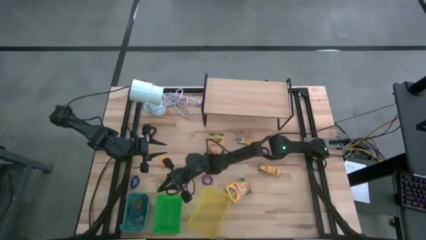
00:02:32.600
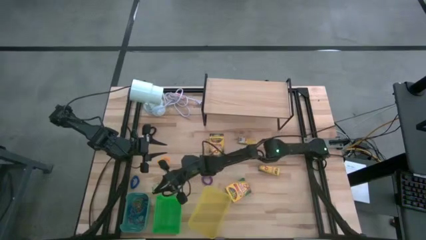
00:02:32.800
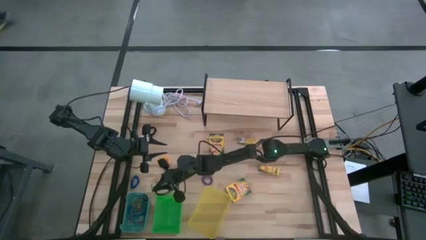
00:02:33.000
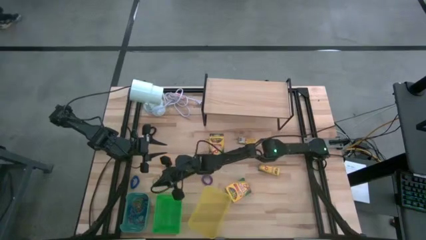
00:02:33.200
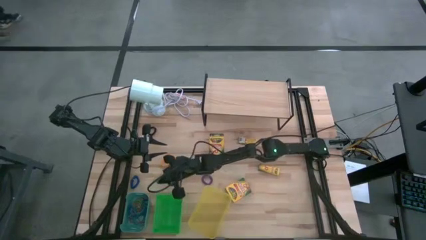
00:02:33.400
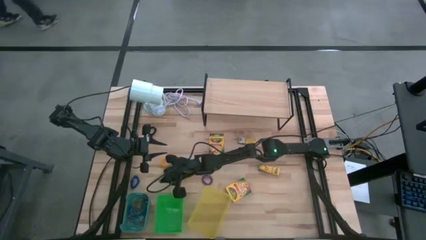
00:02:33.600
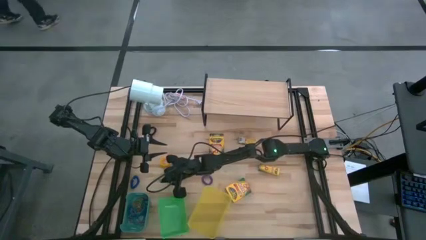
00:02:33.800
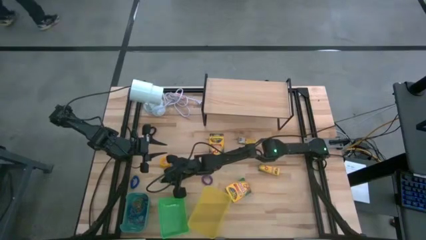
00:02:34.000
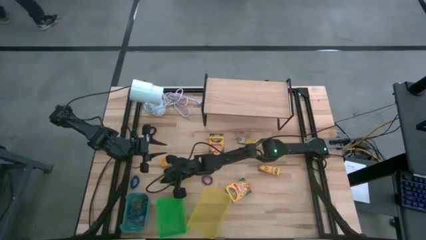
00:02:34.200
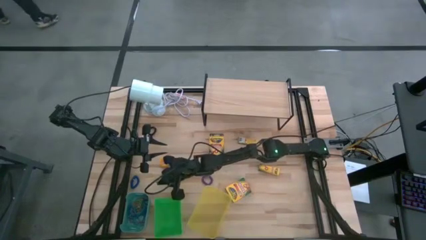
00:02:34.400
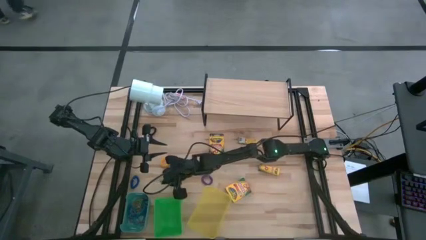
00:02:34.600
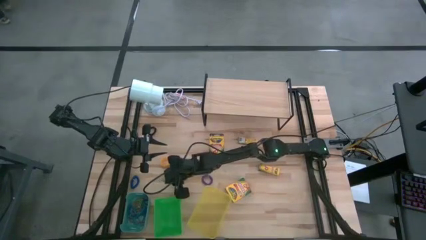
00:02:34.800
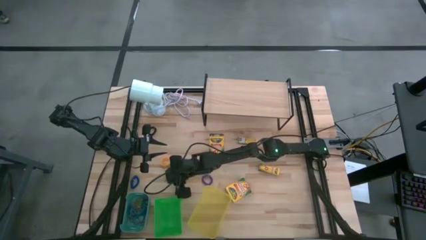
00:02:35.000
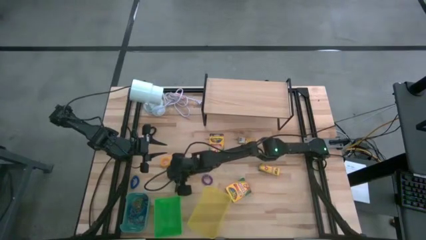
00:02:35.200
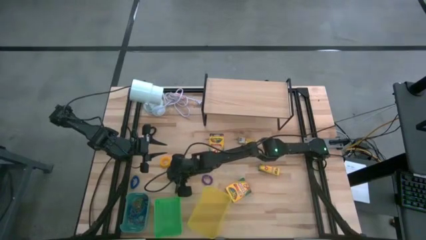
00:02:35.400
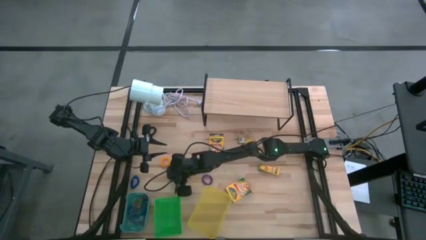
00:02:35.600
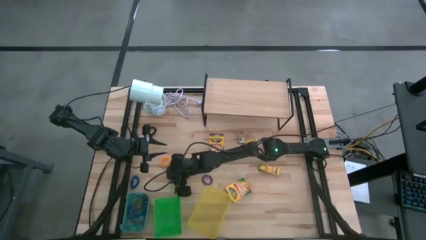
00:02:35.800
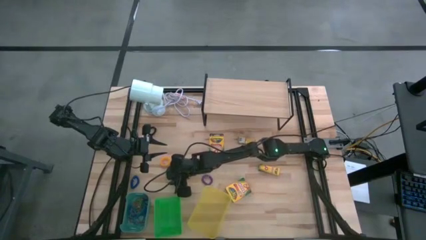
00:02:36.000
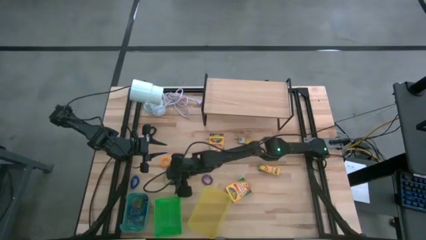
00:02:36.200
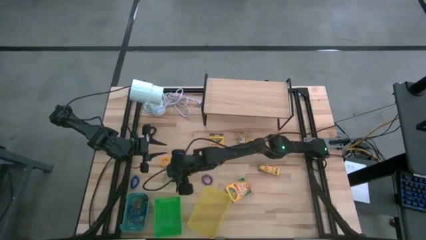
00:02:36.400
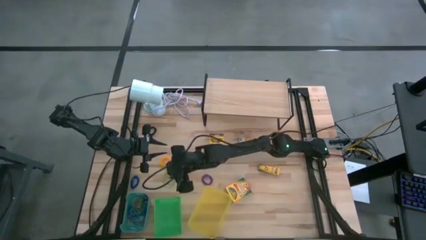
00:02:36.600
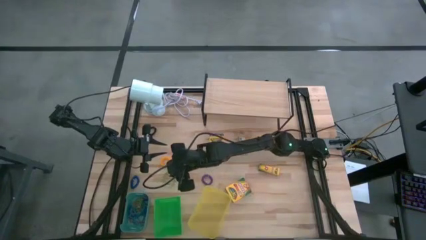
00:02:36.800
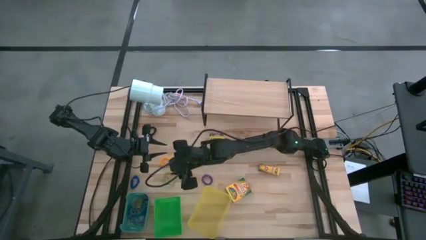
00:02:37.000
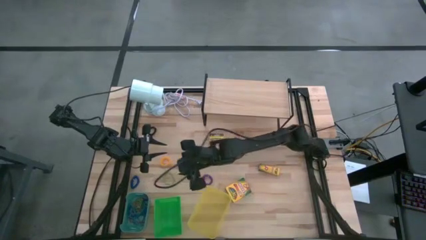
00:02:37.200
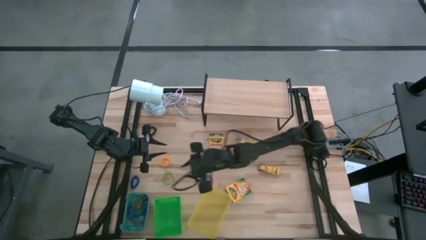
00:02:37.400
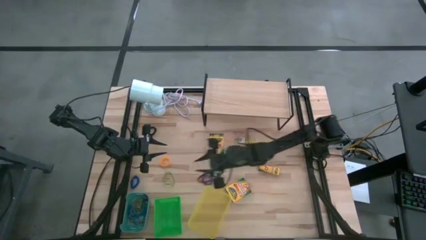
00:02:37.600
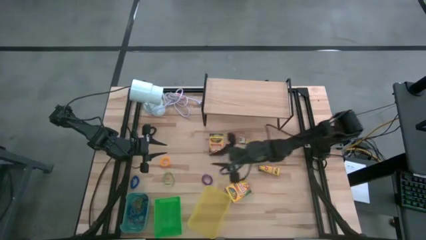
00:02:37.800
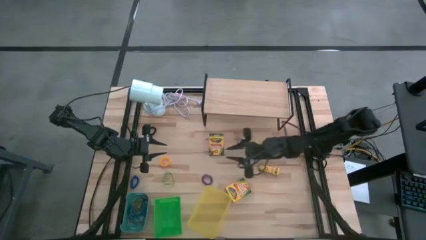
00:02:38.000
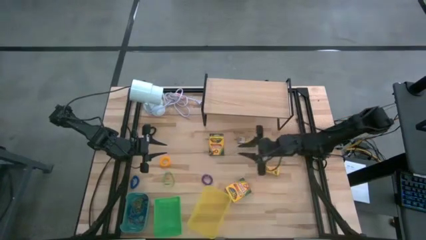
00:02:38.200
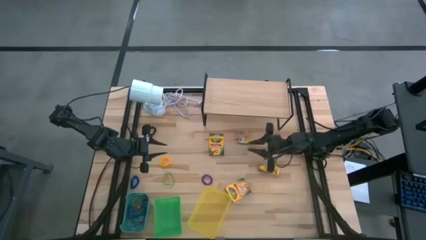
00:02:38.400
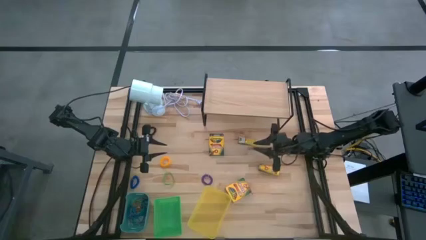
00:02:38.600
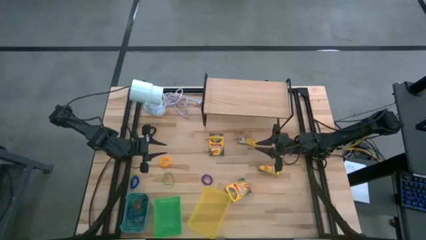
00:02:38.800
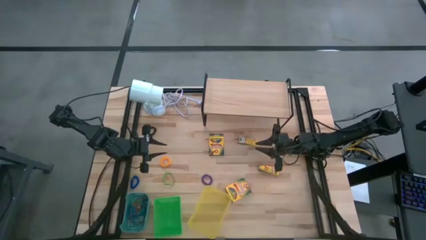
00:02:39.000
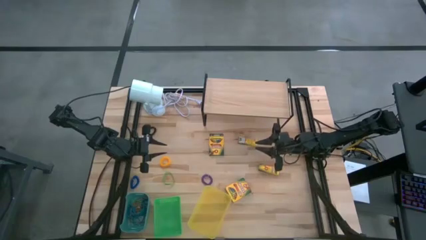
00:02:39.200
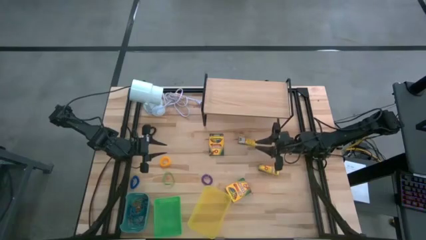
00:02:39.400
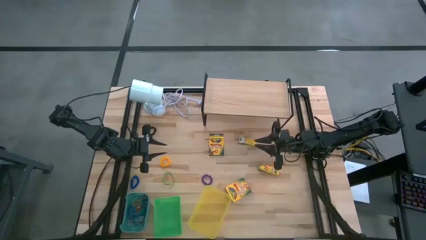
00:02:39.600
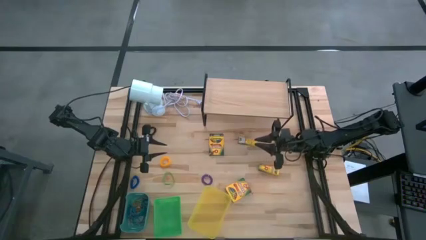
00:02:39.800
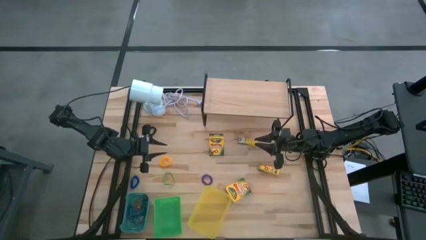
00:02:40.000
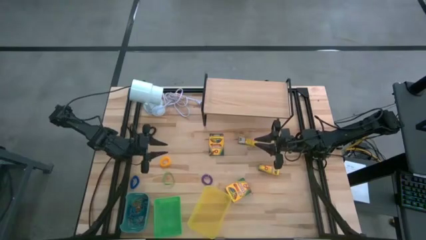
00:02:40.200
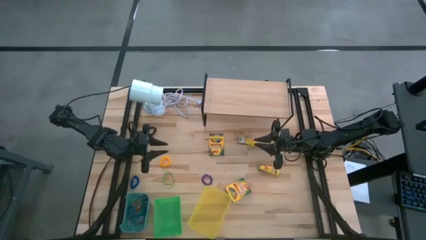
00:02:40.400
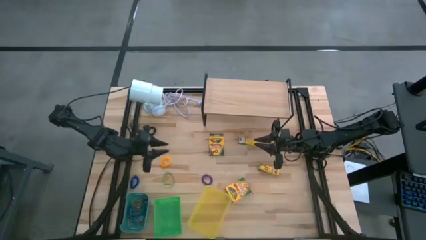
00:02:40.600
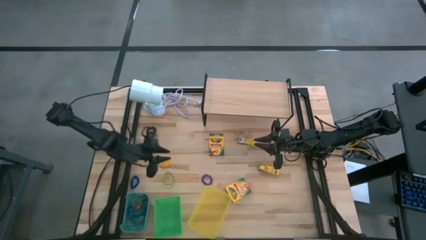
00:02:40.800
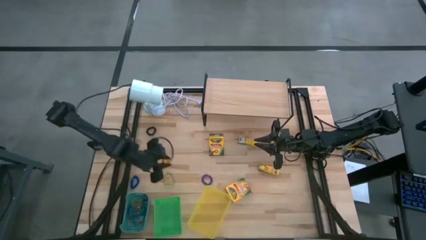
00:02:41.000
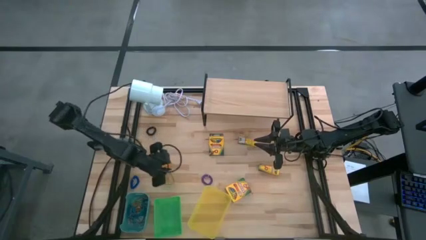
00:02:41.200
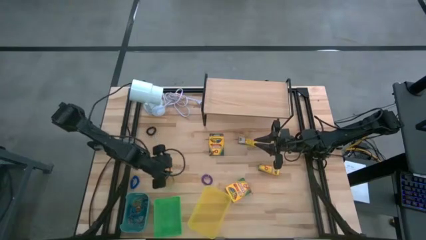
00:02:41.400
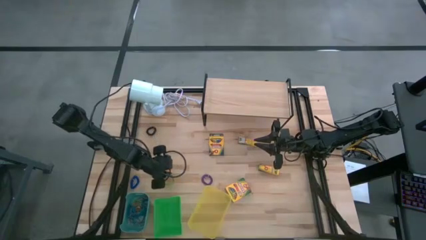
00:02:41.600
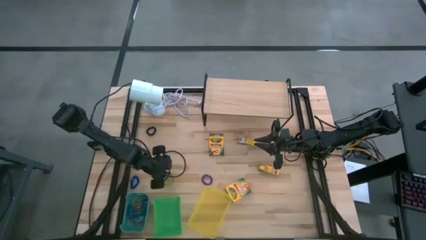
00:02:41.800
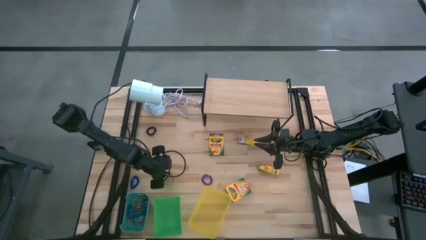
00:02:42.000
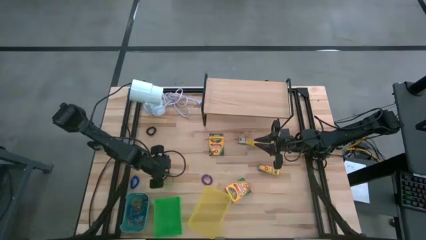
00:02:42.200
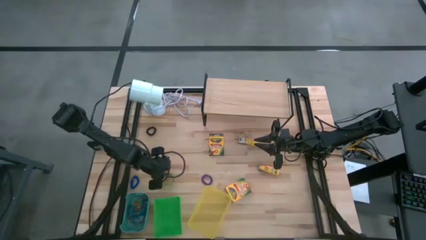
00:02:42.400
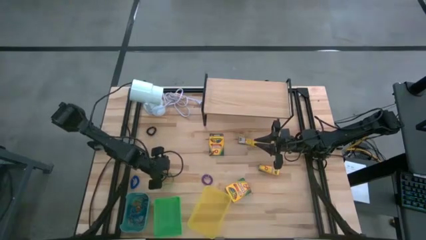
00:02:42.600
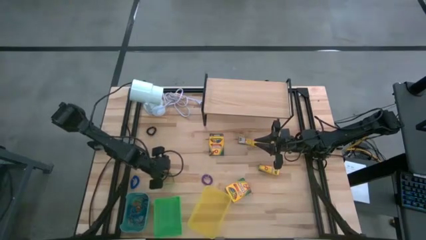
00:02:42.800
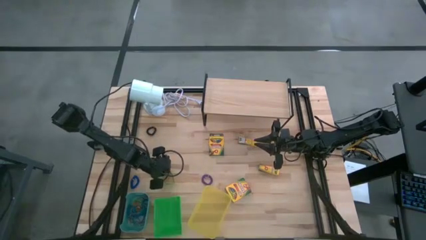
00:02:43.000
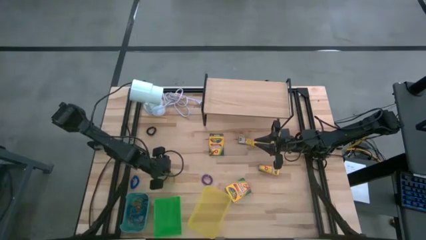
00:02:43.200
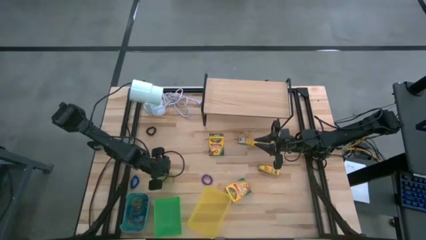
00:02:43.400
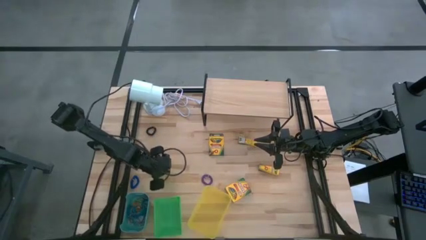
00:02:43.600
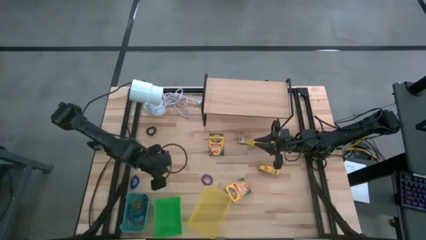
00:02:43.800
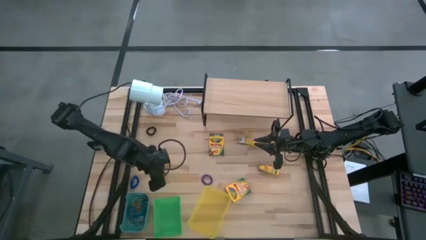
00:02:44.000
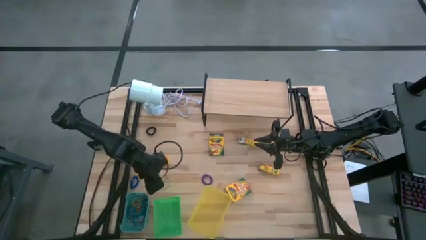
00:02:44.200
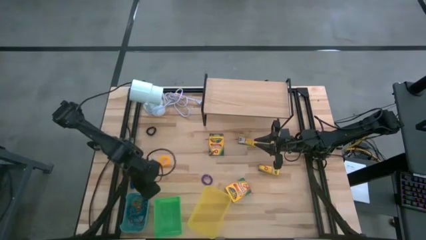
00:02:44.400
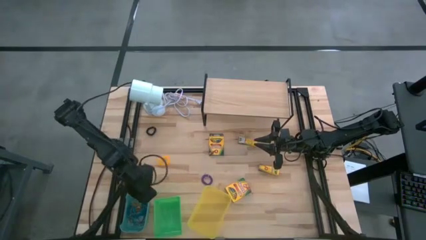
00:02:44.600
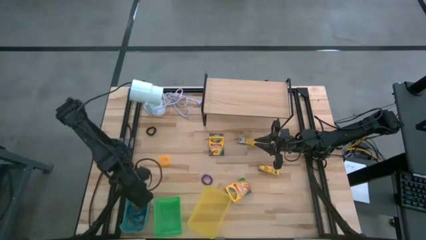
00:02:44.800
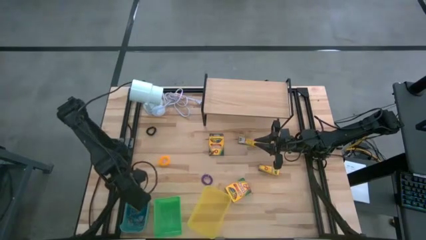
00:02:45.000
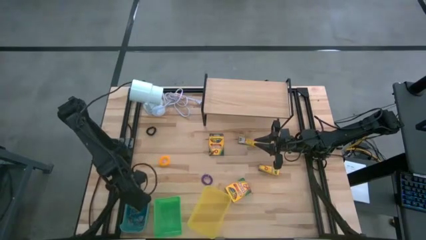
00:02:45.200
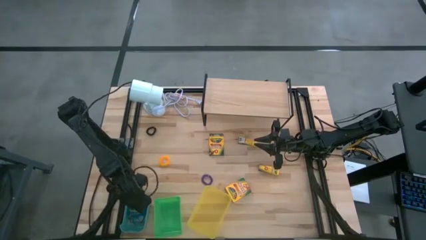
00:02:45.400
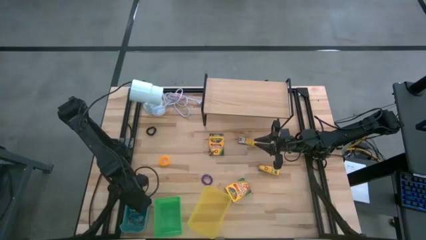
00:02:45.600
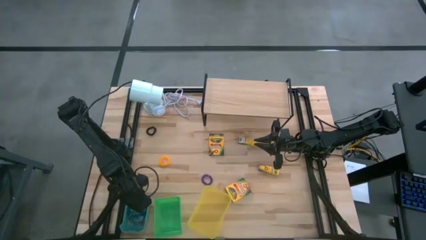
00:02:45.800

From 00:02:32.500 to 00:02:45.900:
Task: Pick & Place Office Desk Supplies
Put the green rubberband into the blue bin
